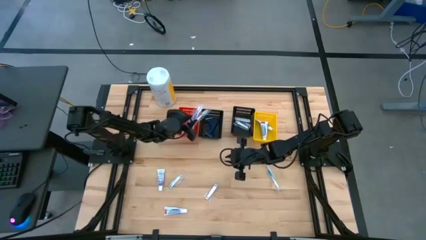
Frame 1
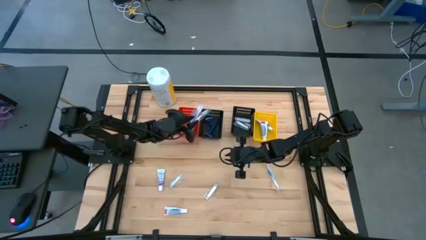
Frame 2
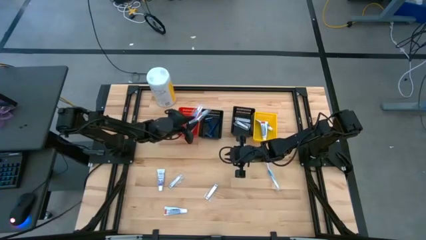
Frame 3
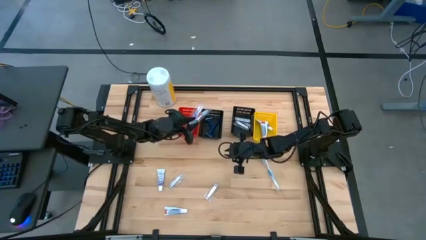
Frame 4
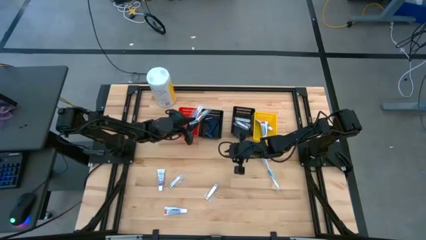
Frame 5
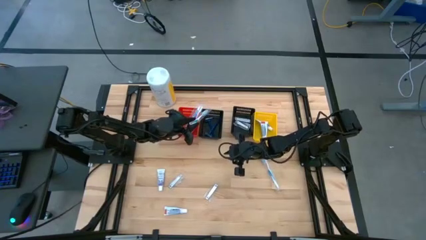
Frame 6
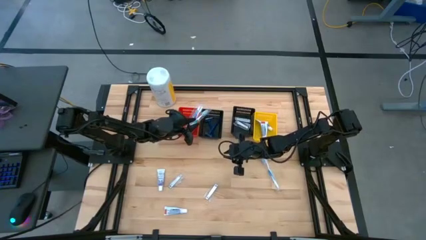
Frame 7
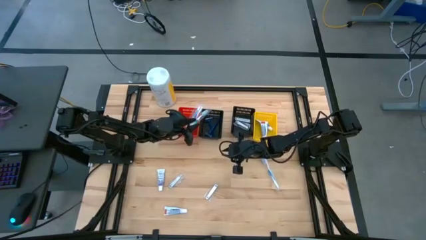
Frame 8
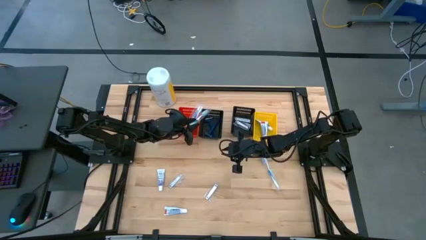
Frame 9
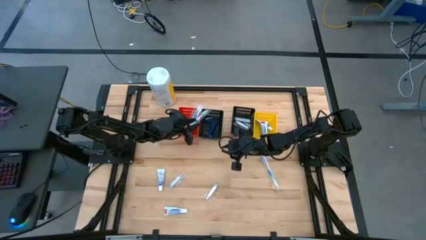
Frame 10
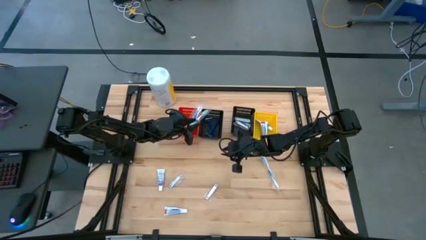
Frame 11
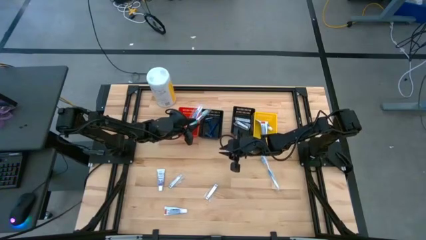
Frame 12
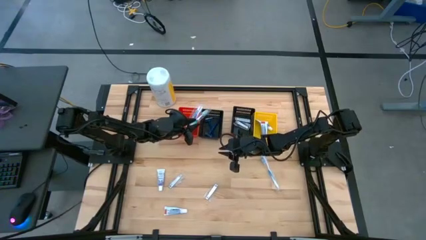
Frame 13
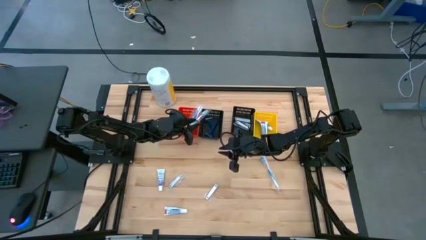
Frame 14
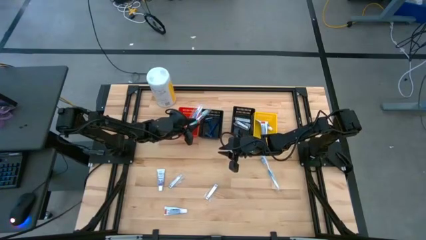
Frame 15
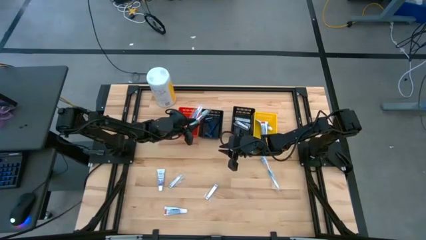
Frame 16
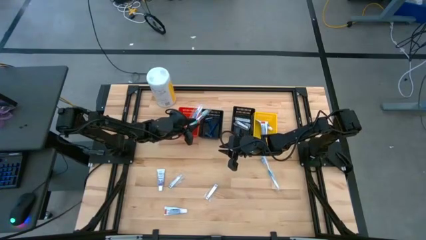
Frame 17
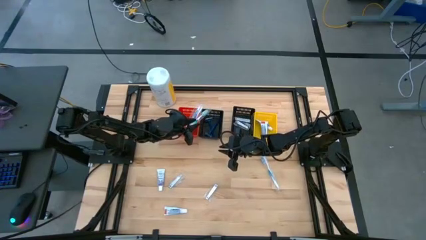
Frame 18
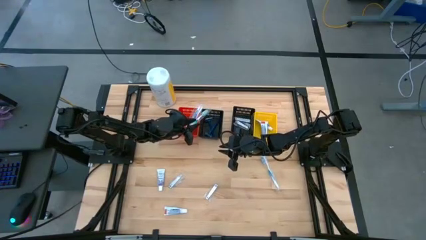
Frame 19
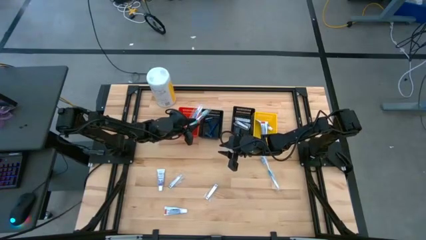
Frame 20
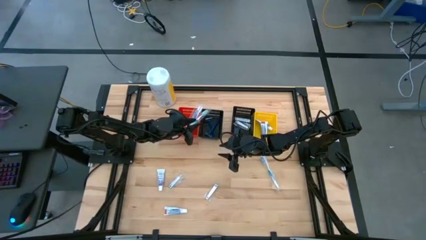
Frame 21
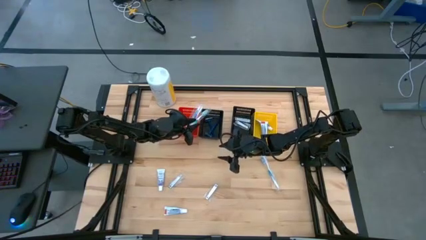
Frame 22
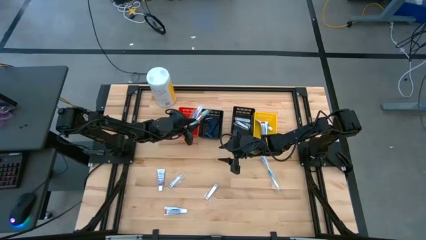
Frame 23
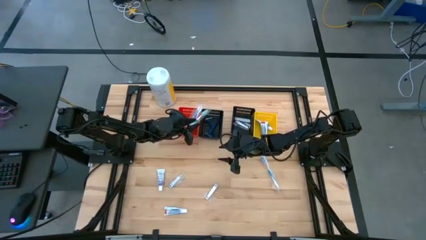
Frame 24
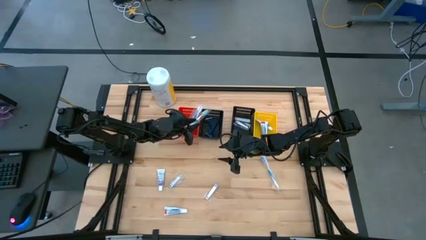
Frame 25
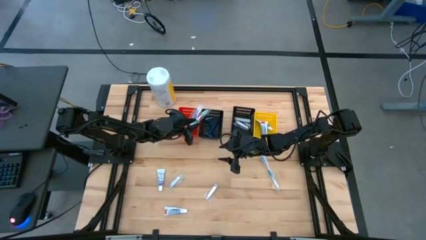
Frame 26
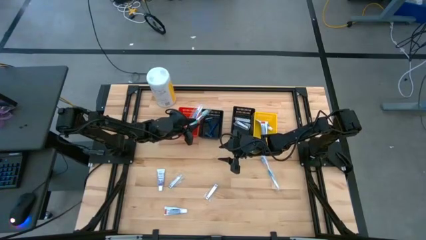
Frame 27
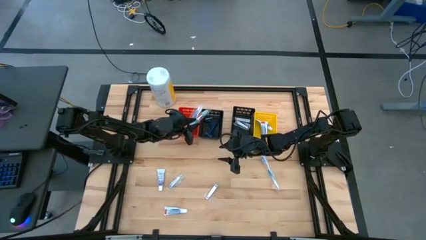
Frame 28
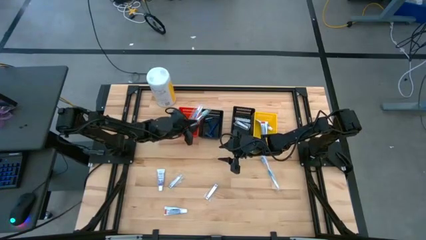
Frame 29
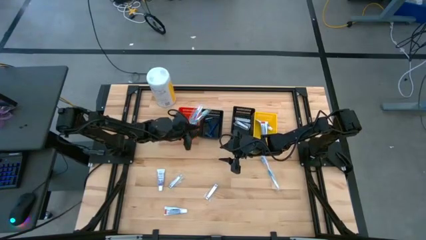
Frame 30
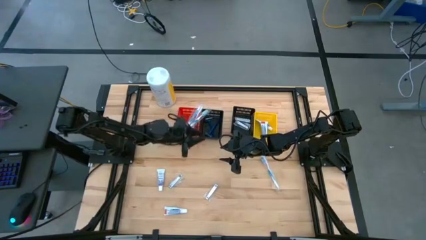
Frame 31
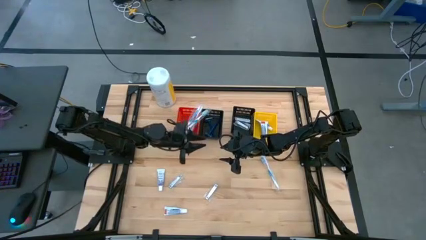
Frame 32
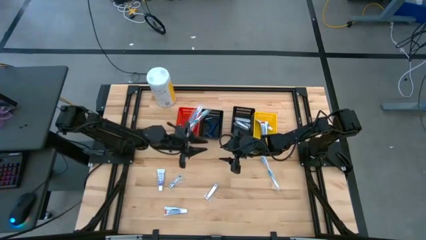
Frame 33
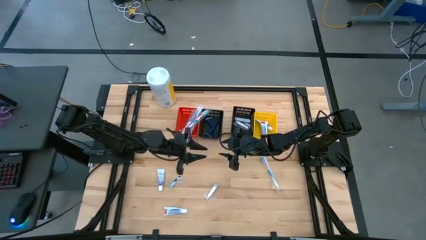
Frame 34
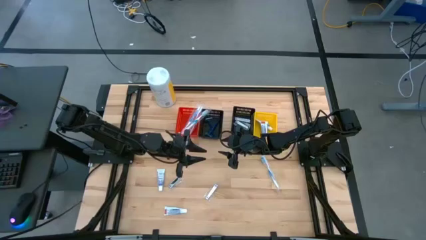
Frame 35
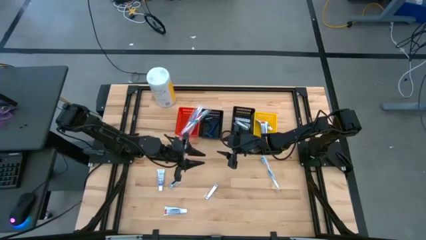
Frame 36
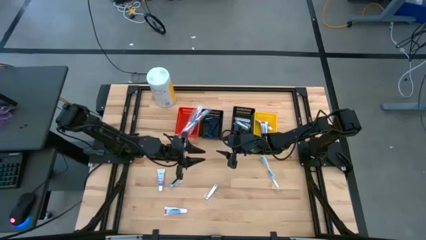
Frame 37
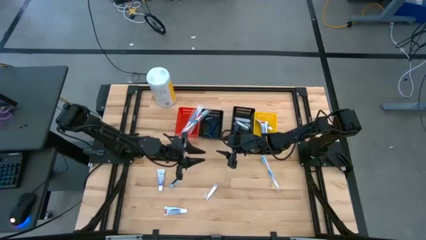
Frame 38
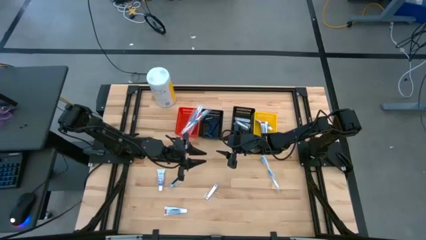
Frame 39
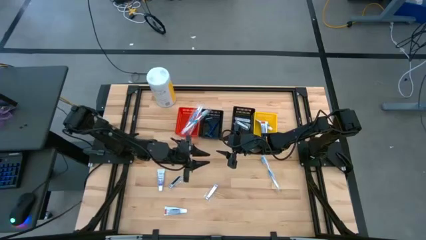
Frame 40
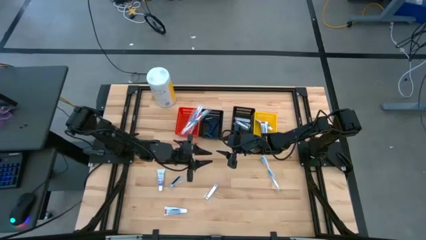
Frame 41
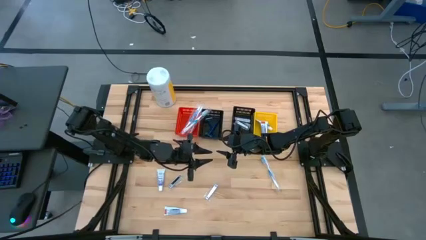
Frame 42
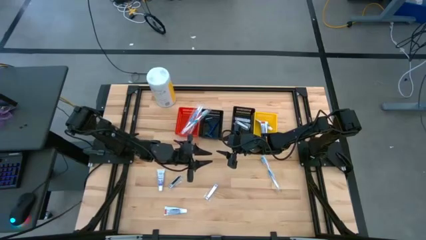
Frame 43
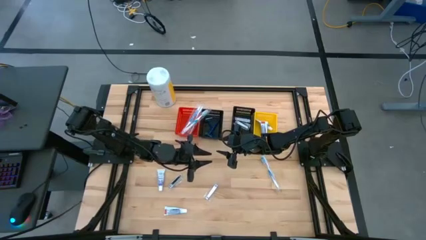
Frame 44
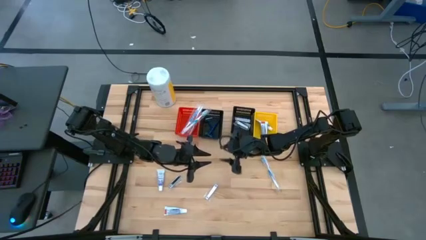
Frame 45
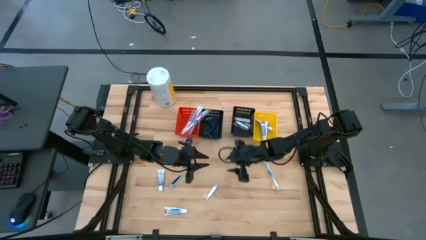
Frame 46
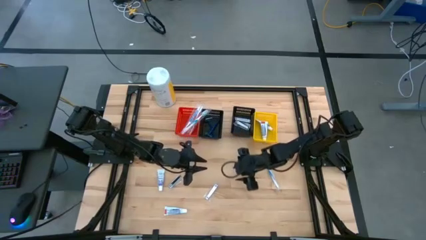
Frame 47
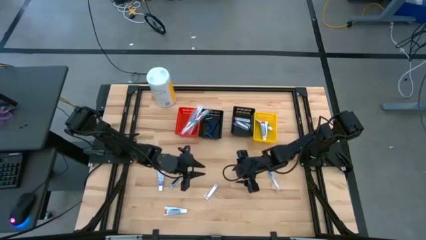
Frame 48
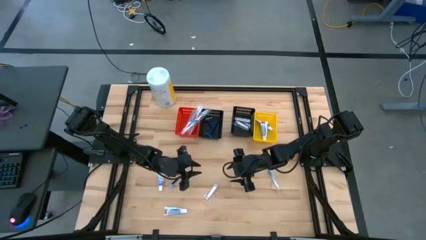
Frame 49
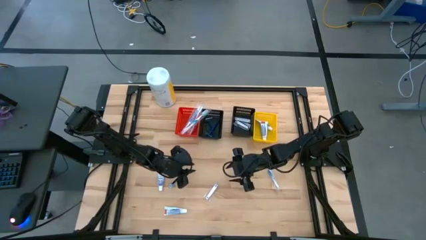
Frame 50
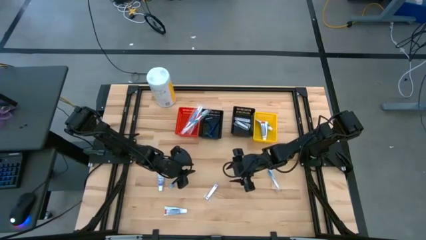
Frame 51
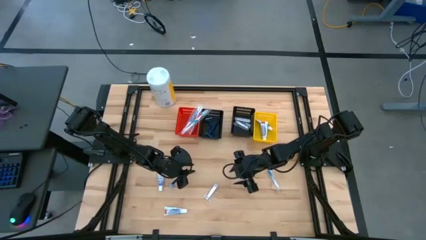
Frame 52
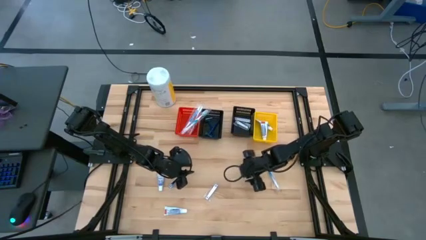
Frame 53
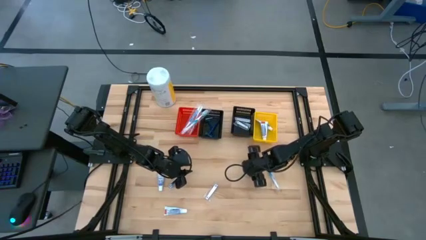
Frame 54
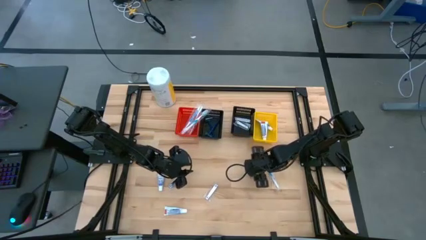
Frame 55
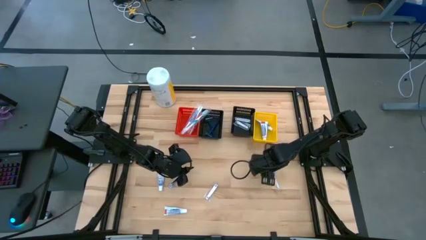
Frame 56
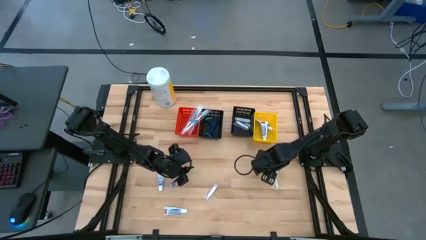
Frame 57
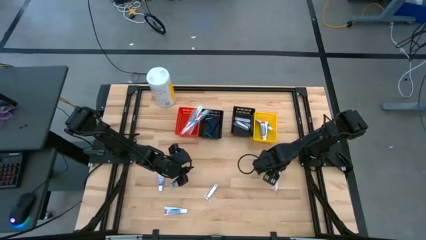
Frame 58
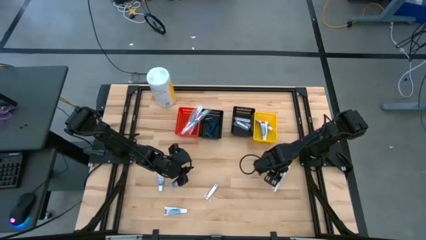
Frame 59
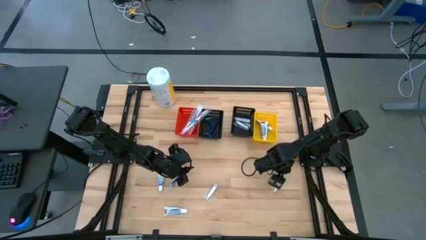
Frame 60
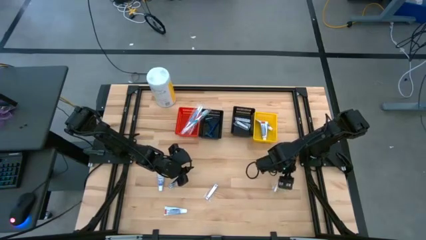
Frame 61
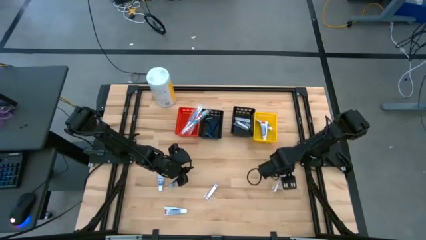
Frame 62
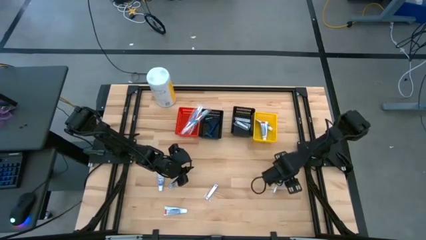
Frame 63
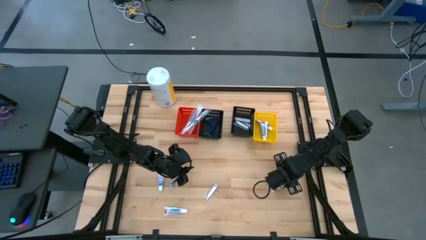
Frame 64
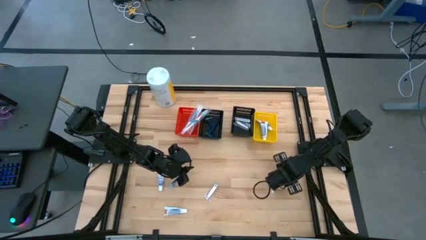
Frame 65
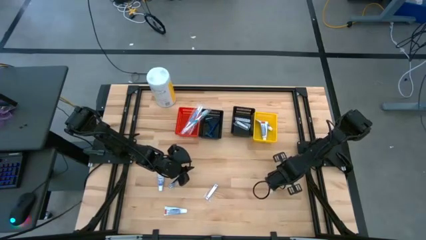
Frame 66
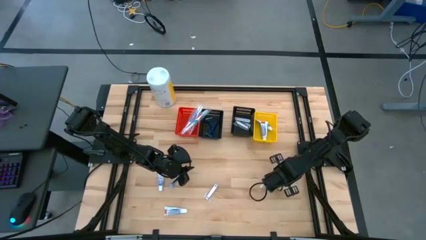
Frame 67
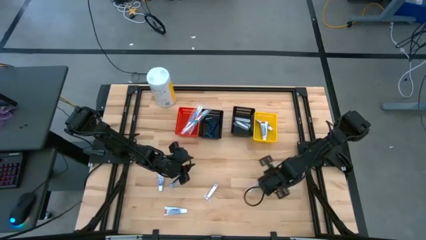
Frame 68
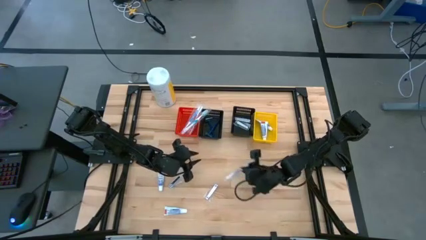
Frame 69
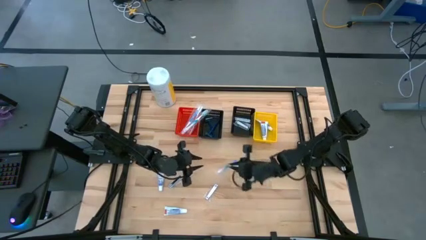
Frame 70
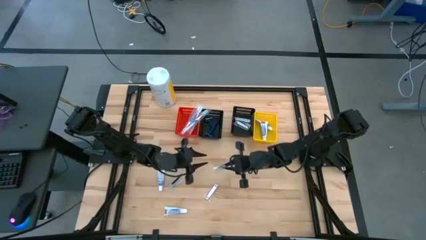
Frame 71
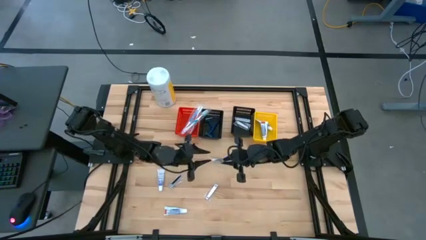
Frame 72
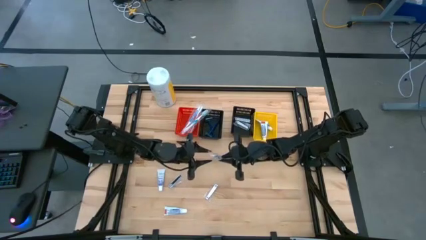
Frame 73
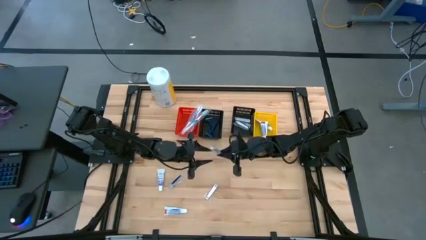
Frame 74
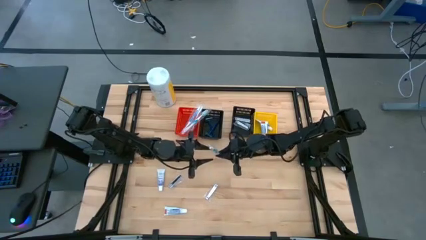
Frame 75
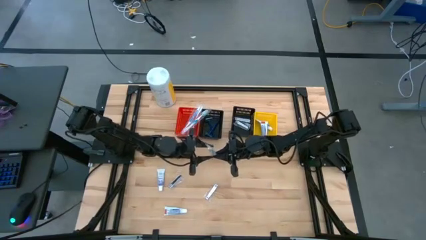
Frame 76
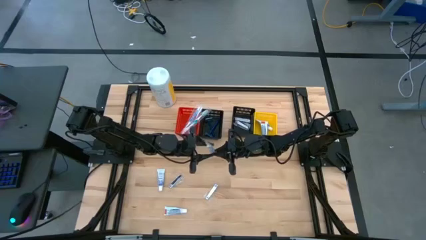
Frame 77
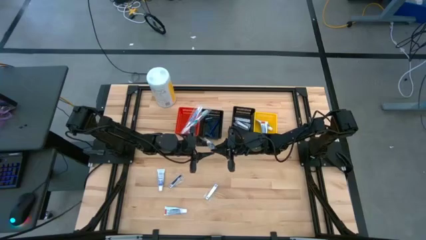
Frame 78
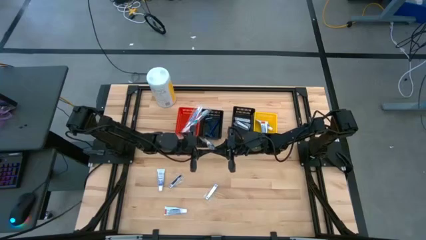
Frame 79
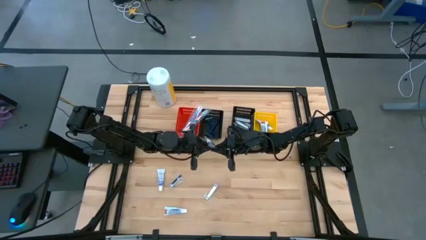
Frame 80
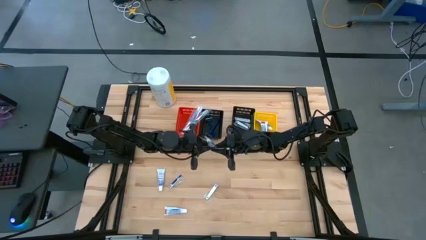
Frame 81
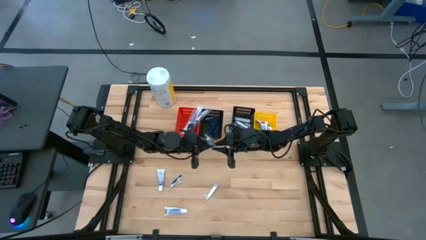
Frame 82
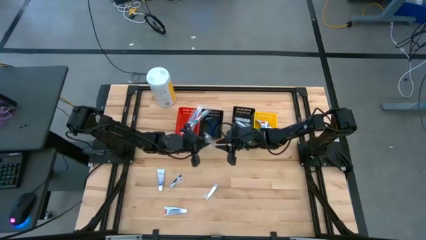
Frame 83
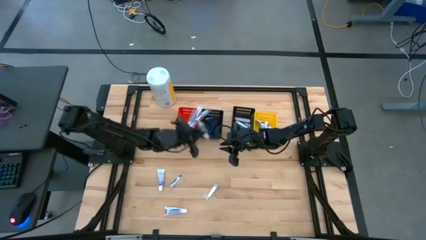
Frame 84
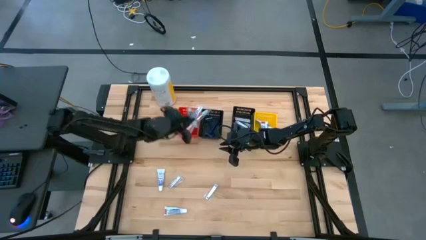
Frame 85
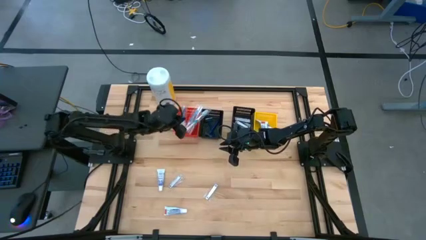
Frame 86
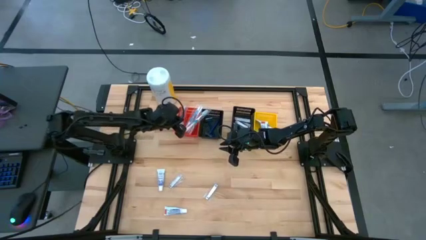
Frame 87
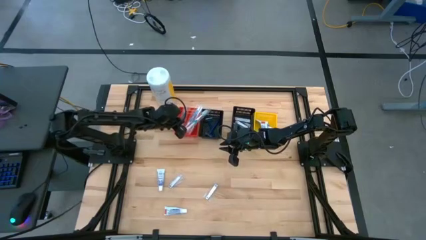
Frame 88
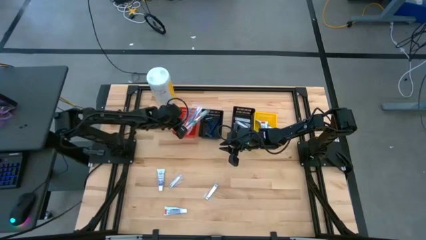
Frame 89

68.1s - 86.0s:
Task: Pick & Place Travel size toiletries
Put the blue toothbrush into the red basket
